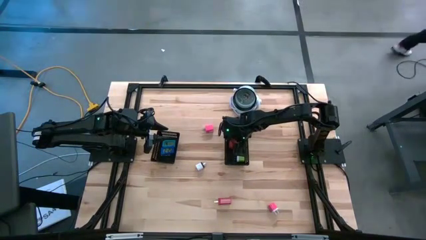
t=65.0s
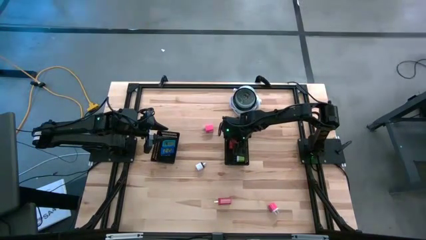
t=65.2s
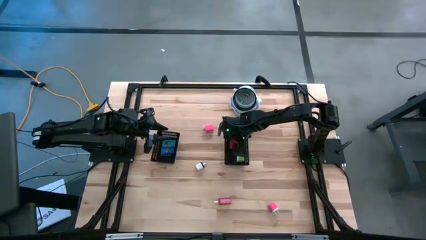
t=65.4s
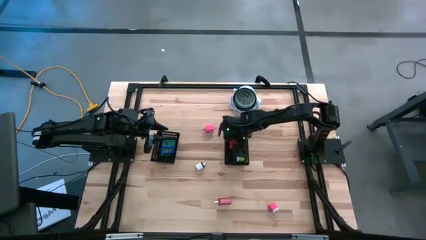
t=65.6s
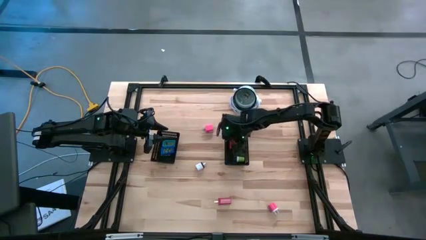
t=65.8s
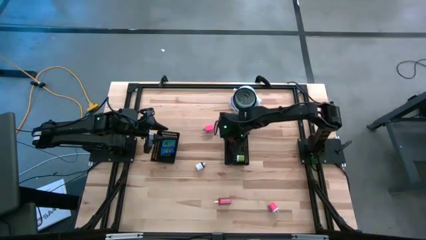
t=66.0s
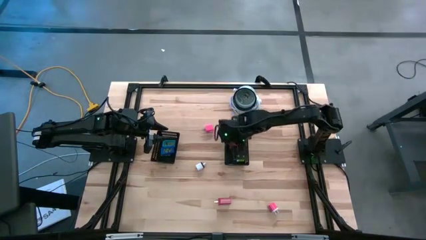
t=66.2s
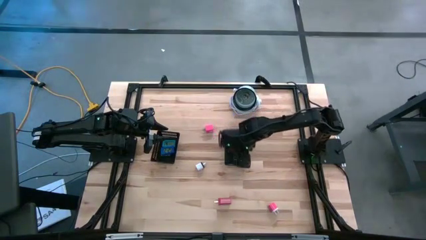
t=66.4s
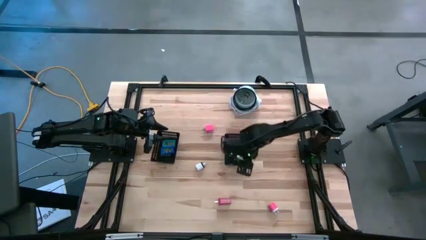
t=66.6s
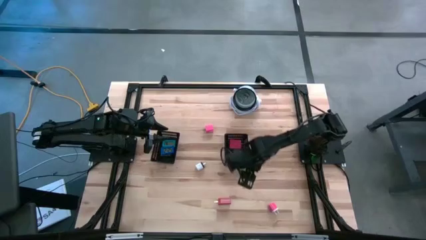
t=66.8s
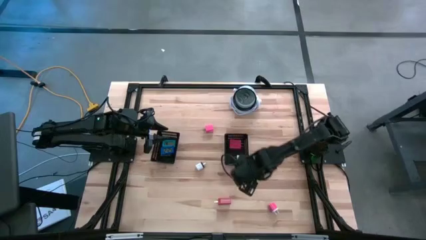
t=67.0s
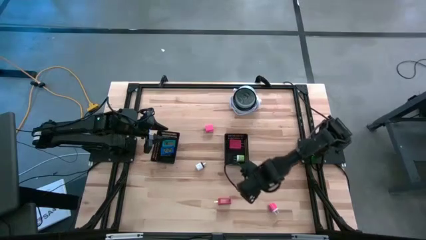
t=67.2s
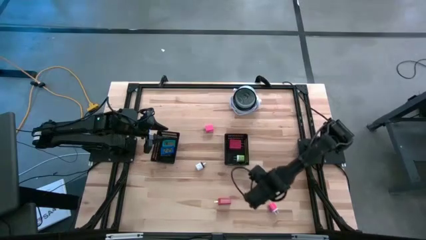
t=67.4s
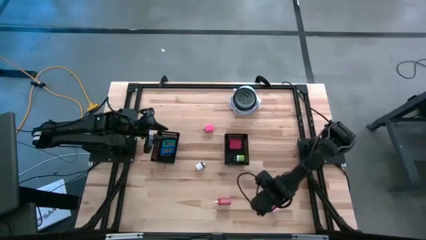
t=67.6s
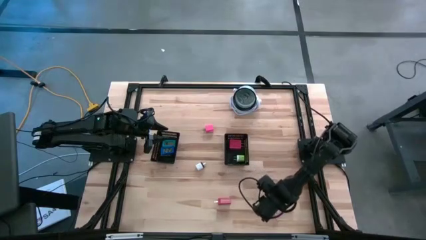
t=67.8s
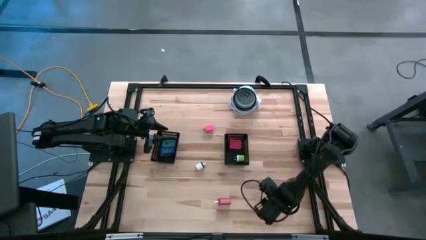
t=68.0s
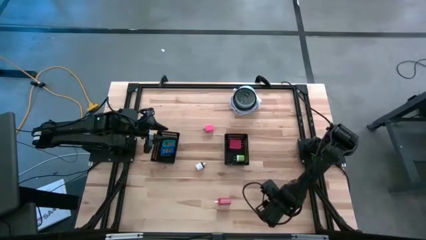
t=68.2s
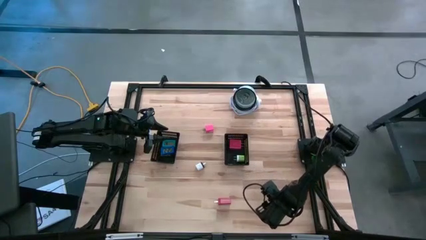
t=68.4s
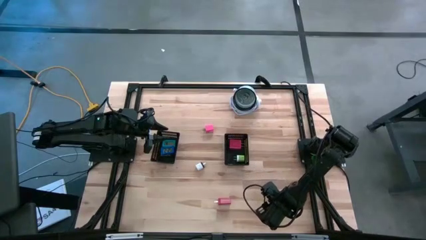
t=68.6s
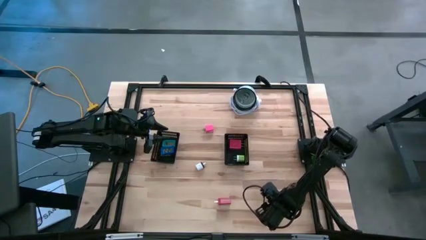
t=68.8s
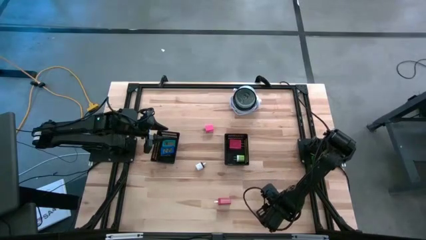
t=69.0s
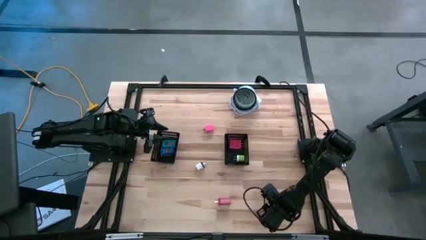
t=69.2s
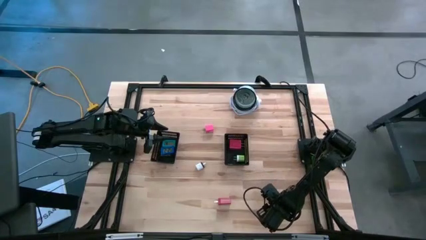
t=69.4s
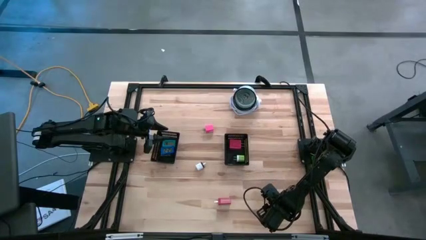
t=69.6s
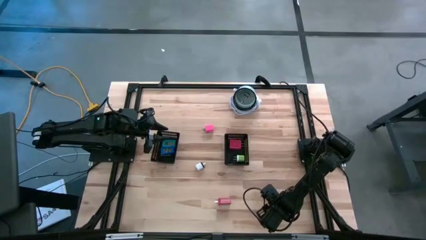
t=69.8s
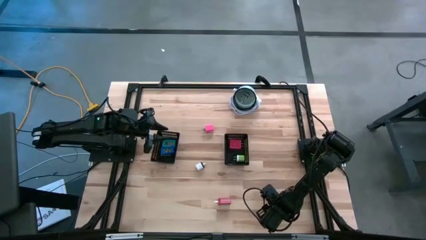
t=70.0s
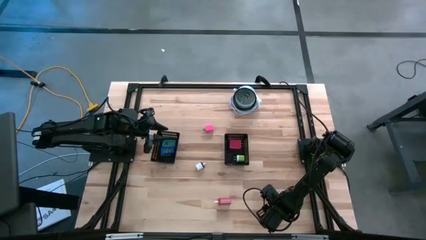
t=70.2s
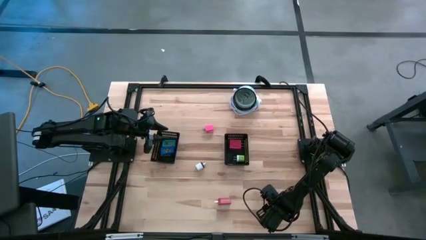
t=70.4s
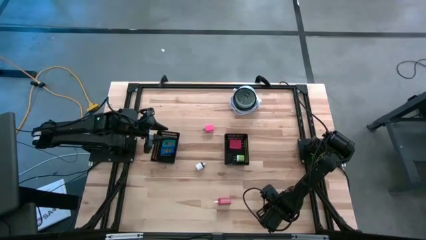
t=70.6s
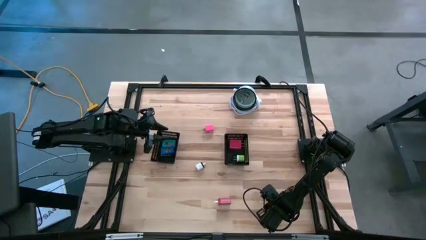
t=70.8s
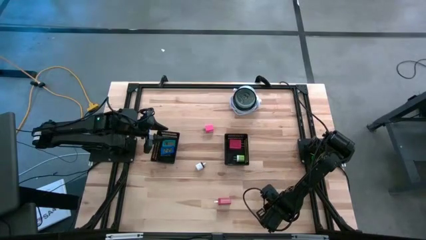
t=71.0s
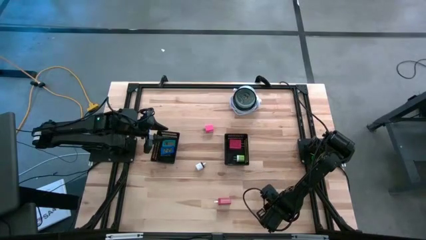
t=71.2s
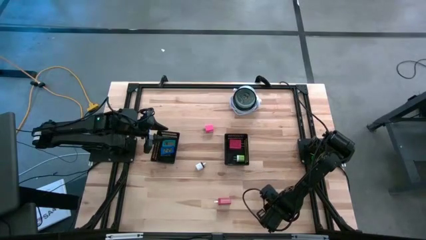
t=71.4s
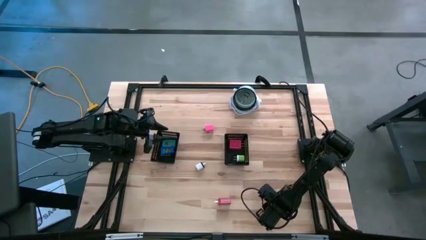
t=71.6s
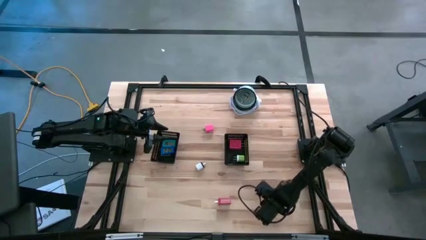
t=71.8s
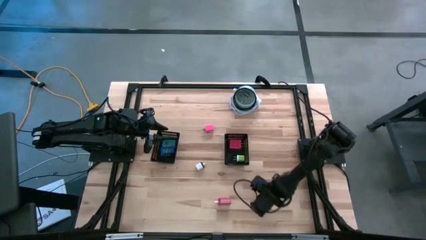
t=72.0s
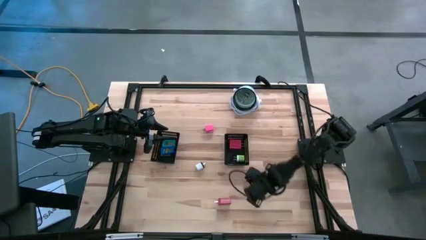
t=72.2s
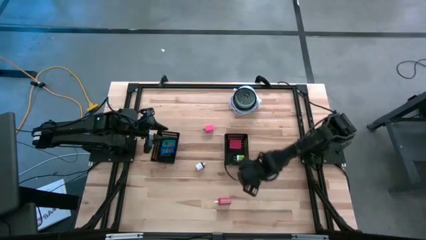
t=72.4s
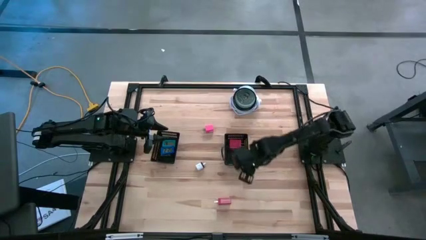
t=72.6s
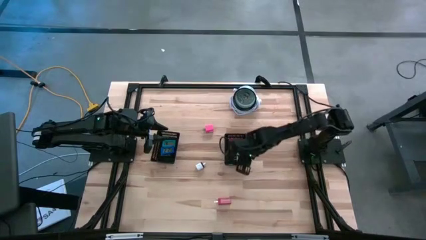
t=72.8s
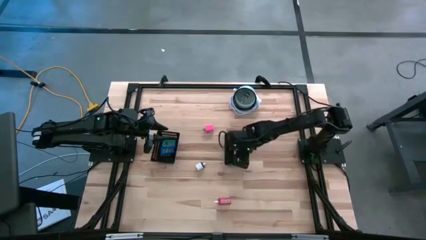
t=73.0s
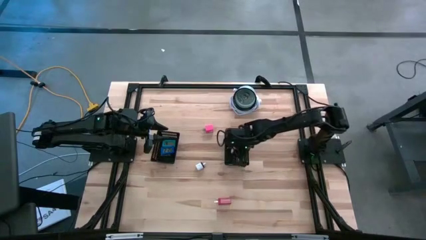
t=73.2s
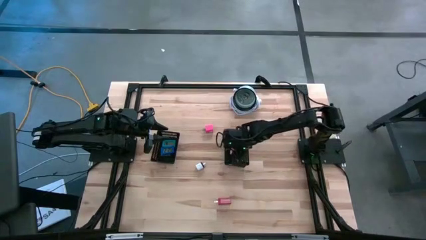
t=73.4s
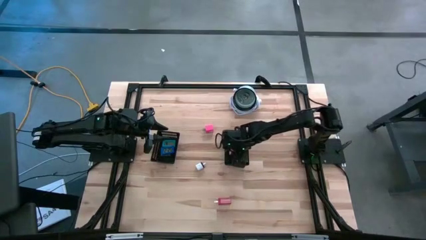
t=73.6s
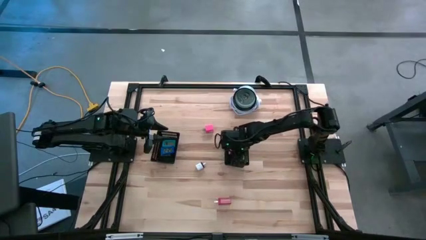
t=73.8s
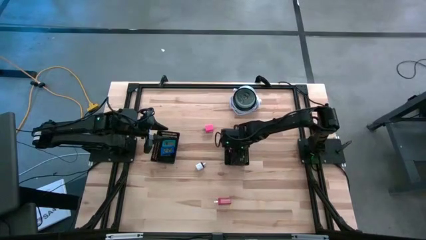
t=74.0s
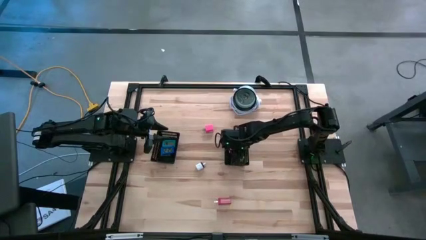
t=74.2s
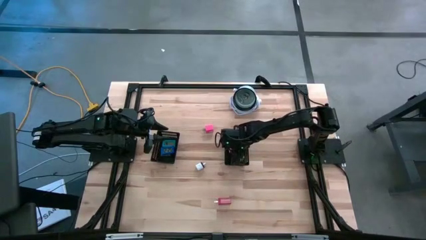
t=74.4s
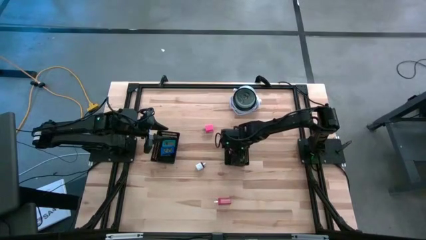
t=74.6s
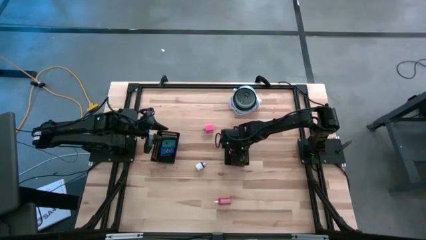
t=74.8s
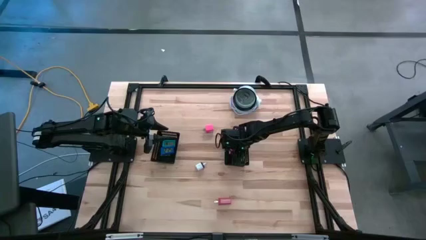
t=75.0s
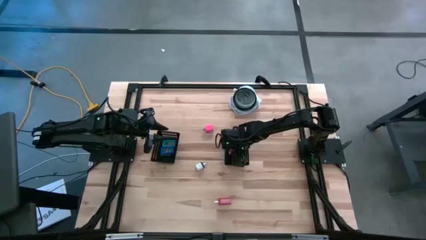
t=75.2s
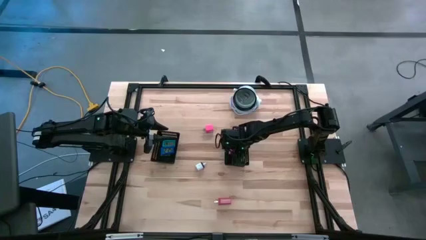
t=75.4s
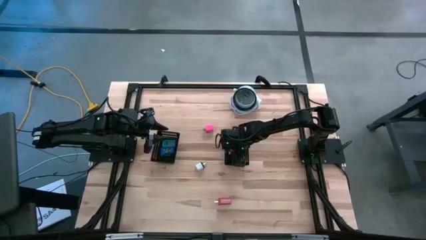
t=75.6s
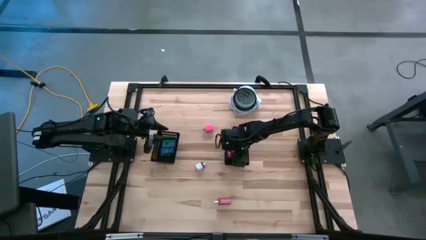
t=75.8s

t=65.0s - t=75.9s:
Task: Pick & Place Office items
Put the bottom pink charger adapter into the right black bin

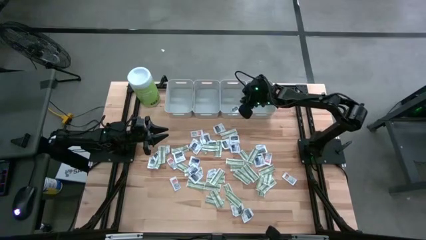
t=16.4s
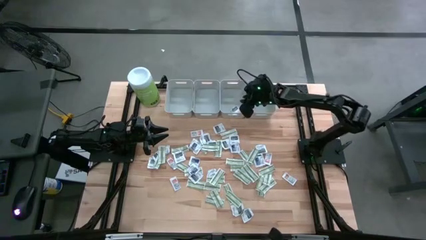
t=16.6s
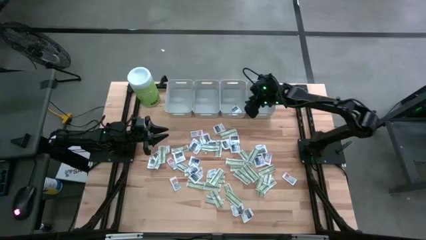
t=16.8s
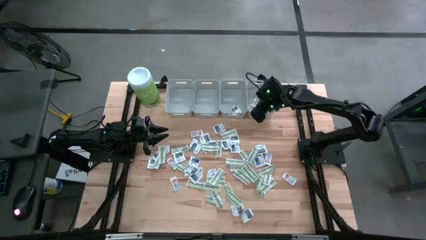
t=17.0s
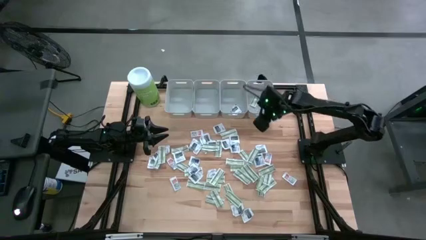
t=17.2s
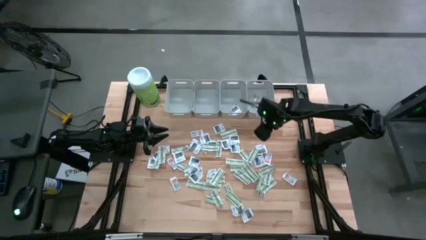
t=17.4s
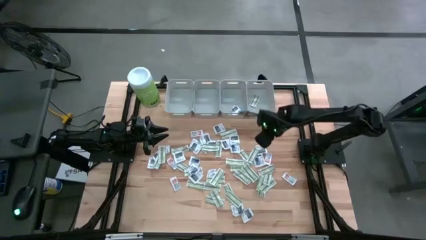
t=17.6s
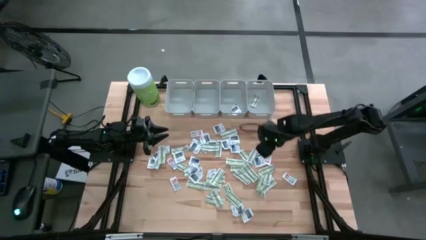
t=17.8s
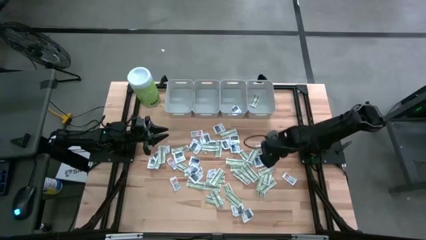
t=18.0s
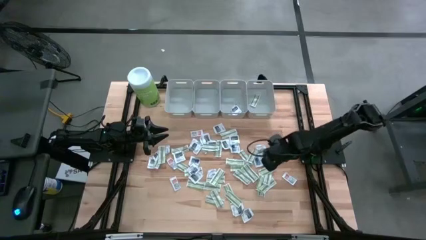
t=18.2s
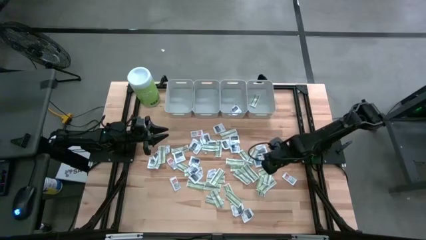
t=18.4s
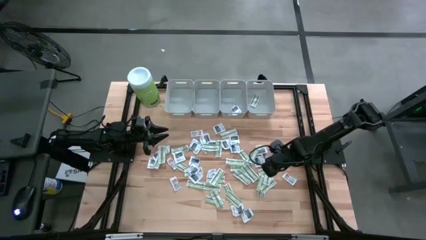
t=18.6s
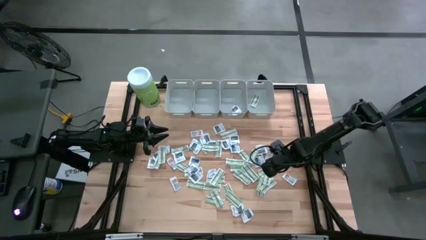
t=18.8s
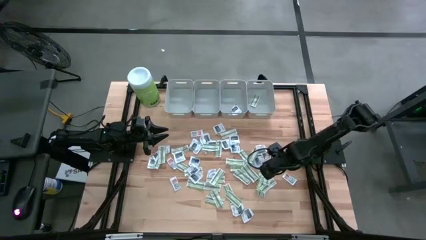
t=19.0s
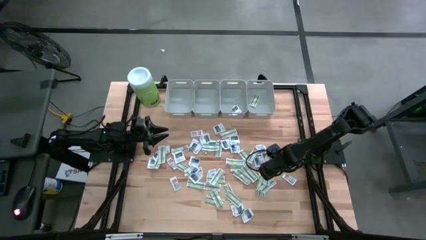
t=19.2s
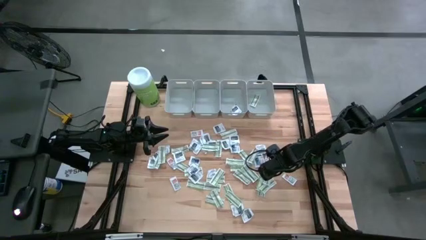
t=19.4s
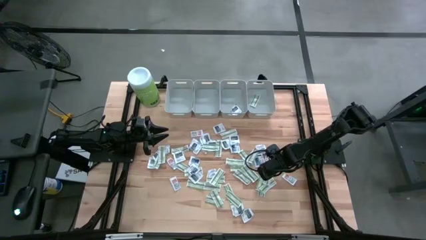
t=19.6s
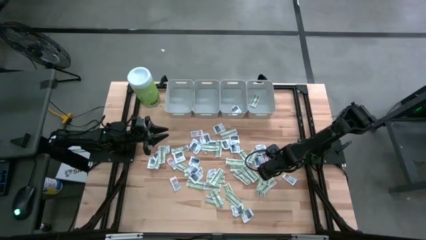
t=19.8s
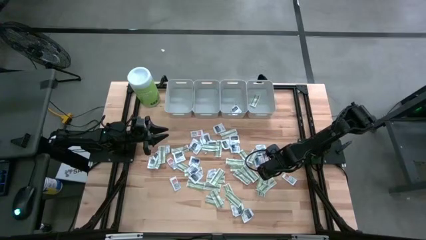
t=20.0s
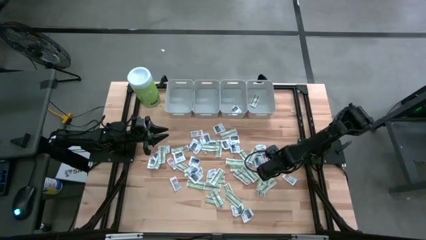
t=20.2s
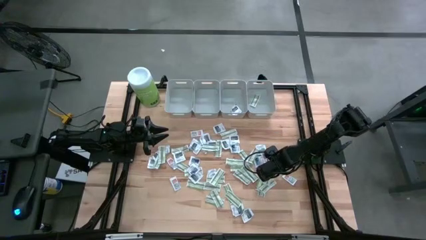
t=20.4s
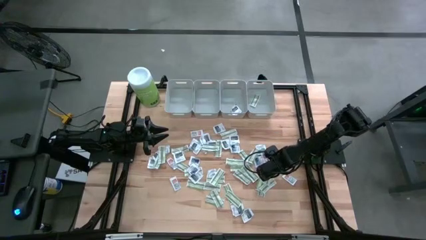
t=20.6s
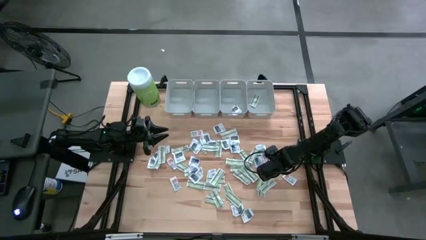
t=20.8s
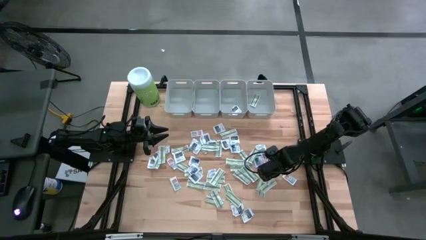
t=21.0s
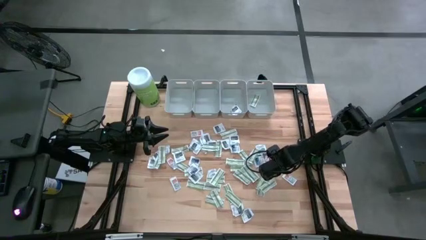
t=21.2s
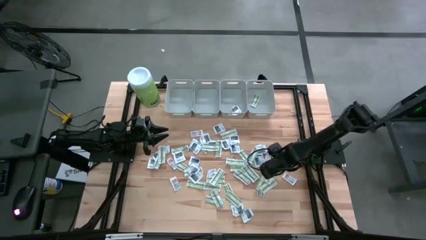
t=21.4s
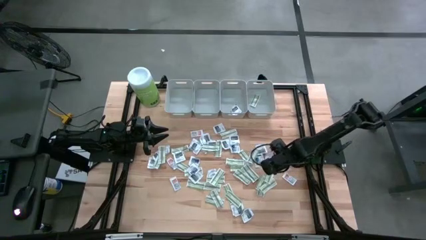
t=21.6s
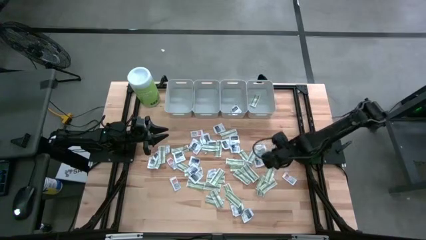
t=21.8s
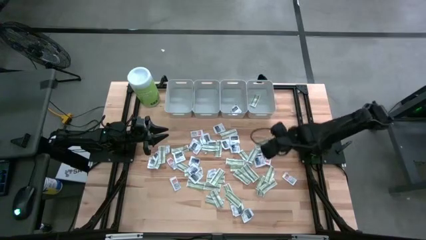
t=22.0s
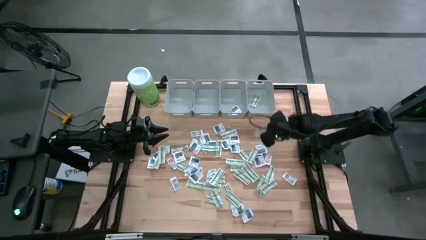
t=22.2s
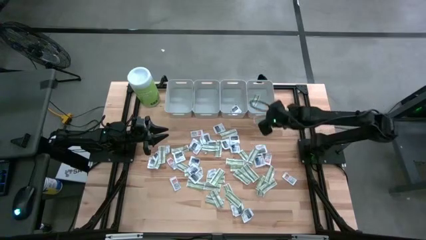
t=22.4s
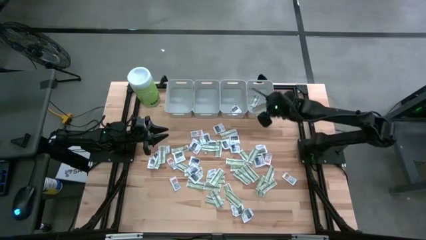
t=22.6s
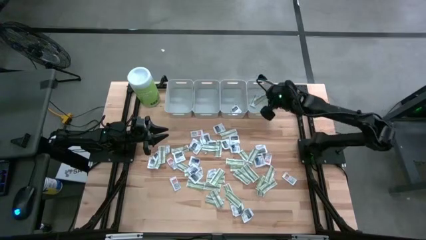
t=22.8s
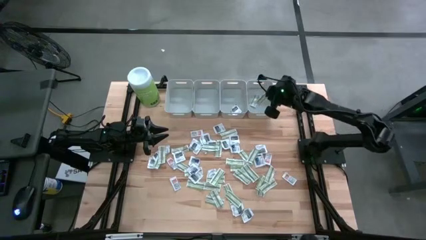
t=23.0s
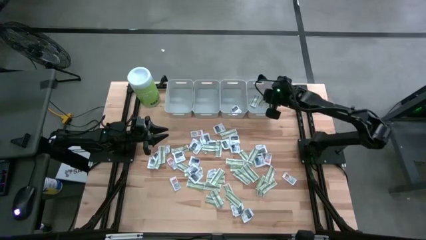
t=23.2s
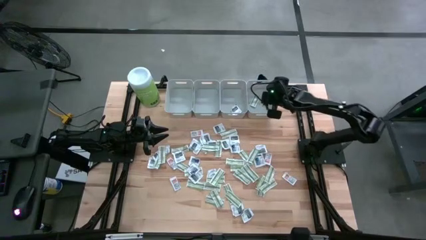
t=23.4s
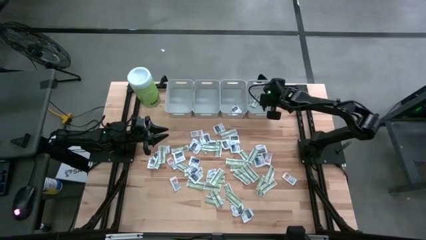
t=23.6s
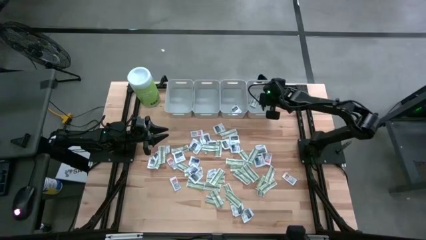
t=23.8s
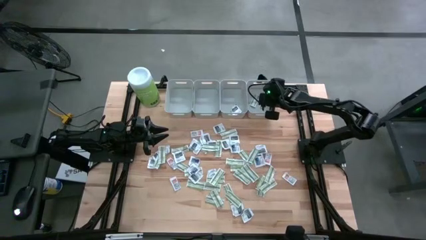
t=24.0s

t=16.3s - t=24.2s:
Task: Pick & Place First Aid Supplies
Put the bandage into the right gray bin
